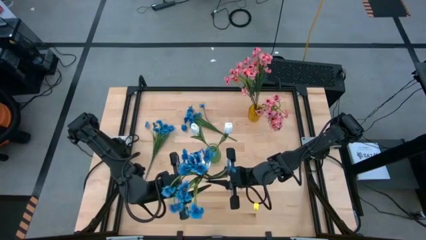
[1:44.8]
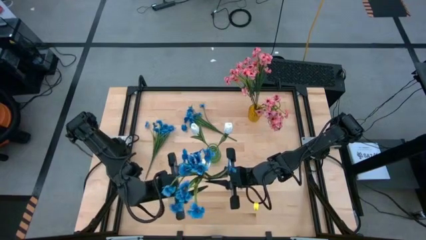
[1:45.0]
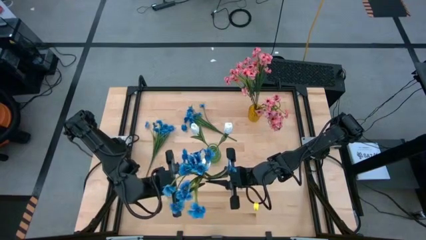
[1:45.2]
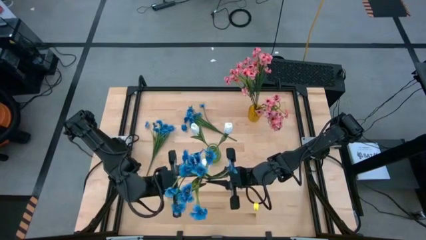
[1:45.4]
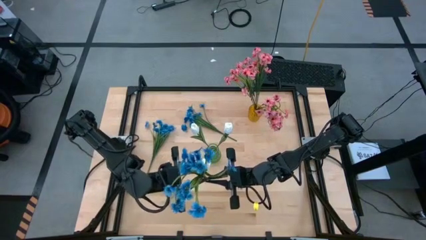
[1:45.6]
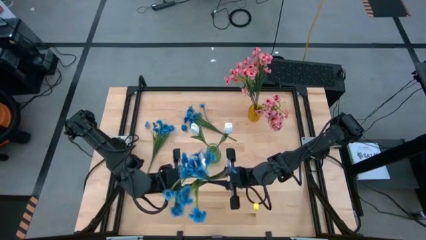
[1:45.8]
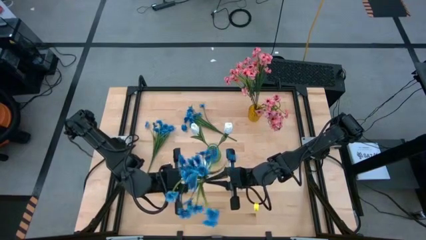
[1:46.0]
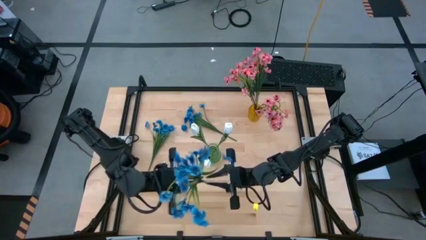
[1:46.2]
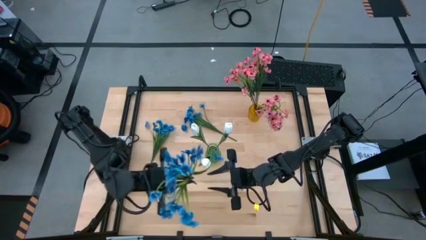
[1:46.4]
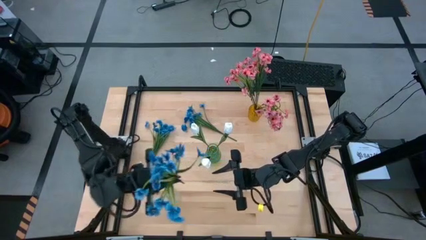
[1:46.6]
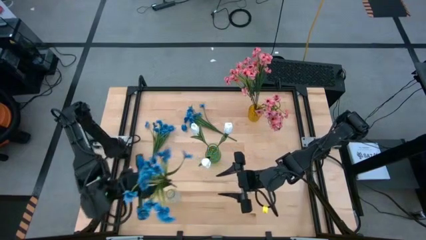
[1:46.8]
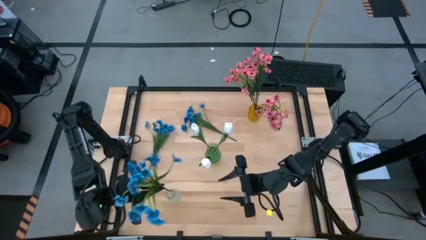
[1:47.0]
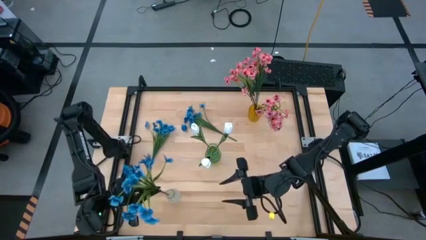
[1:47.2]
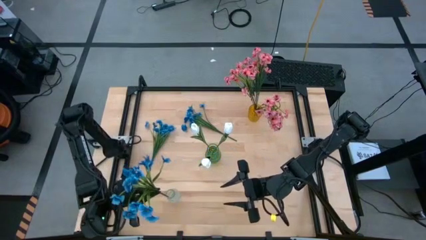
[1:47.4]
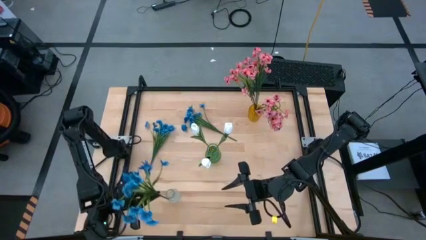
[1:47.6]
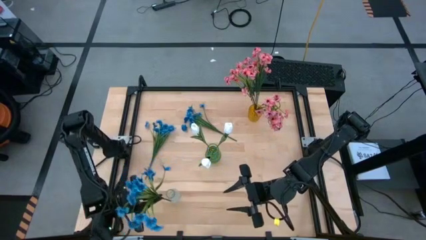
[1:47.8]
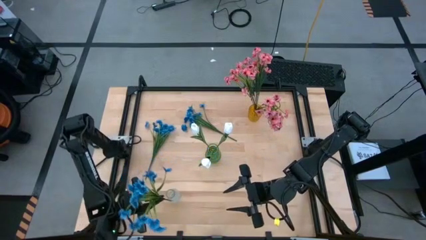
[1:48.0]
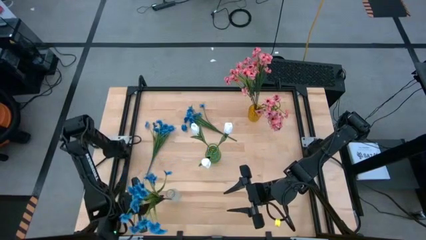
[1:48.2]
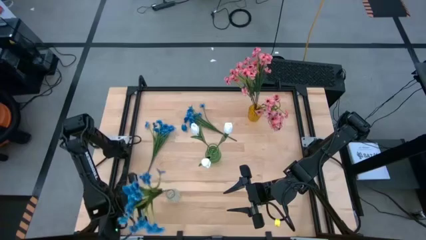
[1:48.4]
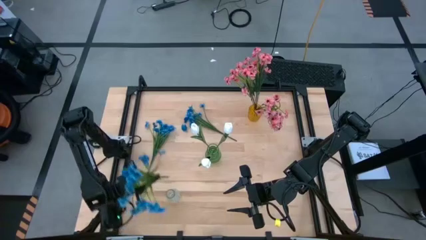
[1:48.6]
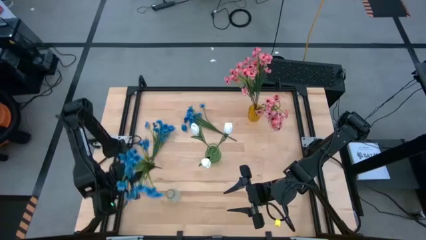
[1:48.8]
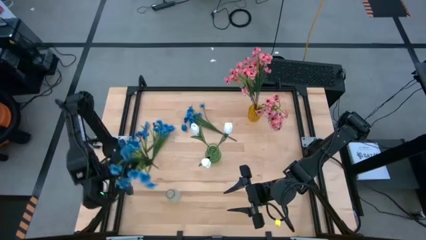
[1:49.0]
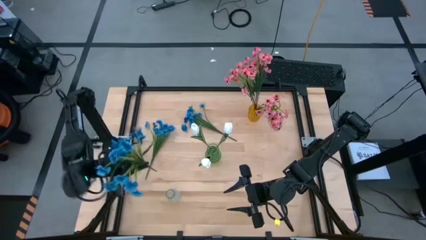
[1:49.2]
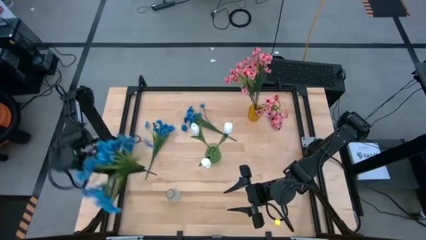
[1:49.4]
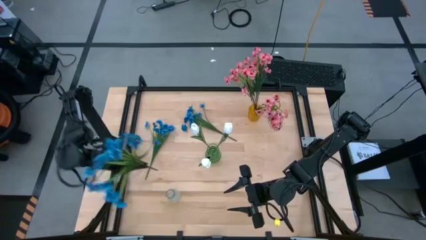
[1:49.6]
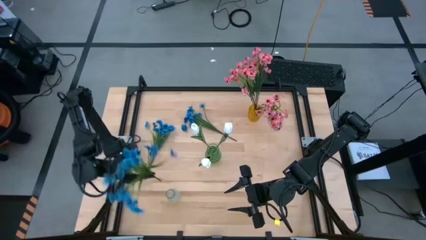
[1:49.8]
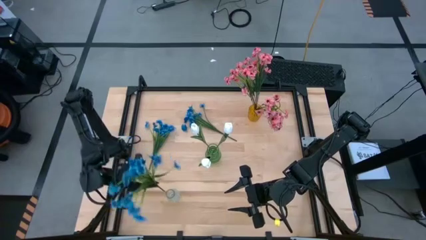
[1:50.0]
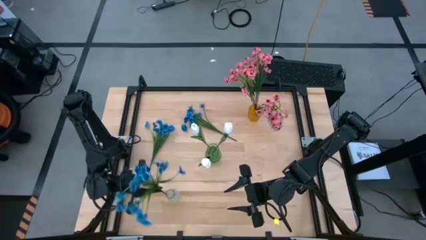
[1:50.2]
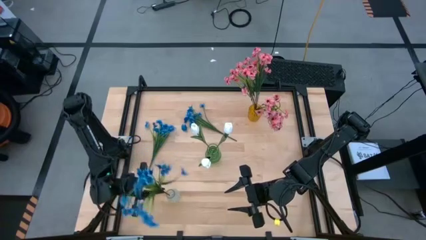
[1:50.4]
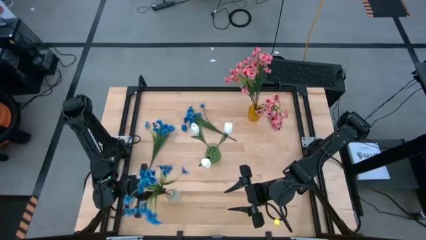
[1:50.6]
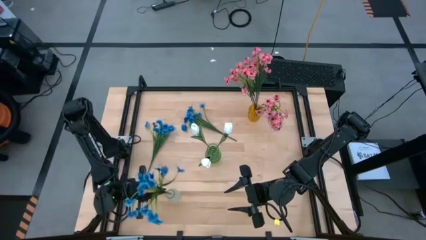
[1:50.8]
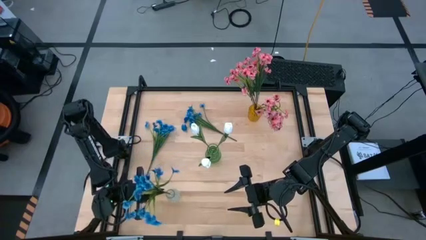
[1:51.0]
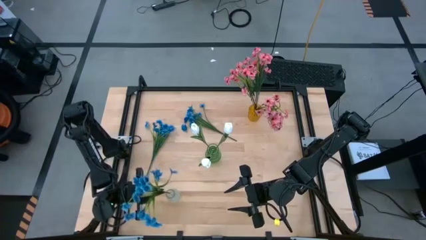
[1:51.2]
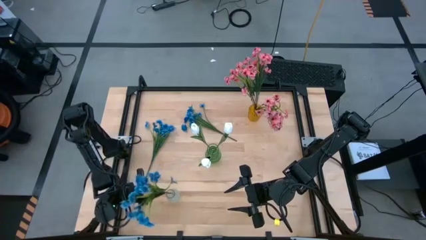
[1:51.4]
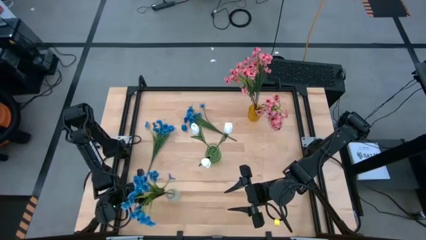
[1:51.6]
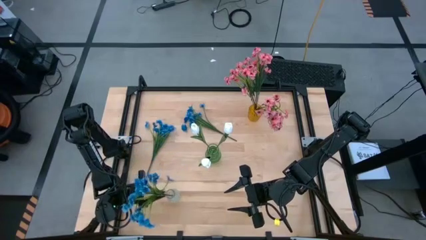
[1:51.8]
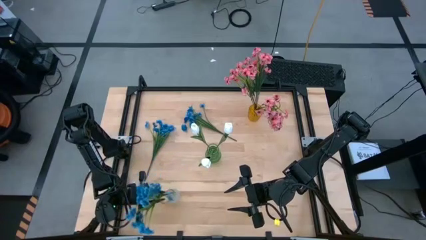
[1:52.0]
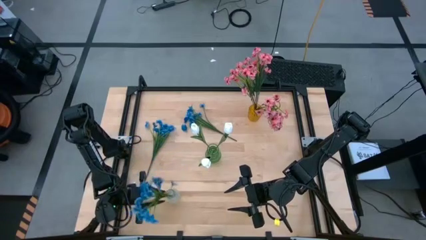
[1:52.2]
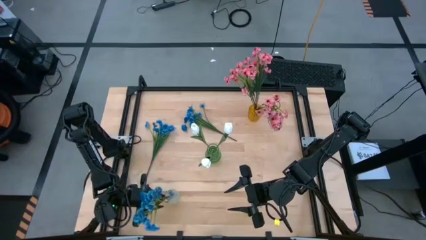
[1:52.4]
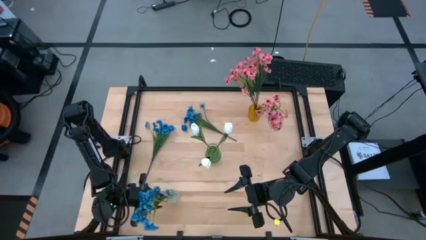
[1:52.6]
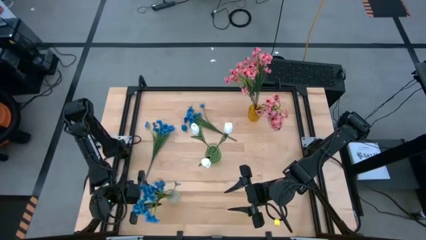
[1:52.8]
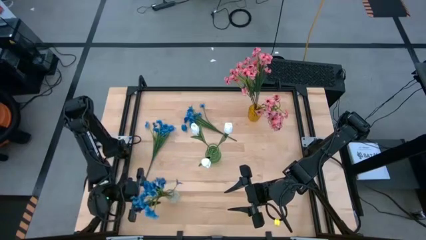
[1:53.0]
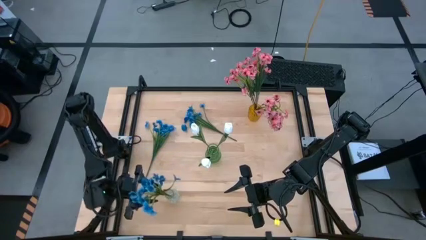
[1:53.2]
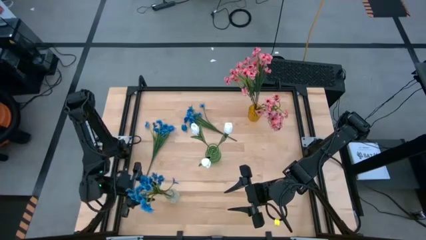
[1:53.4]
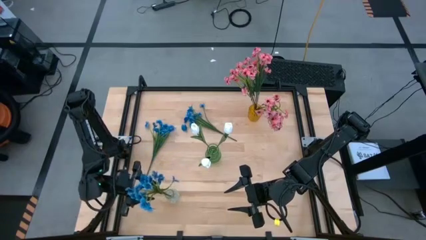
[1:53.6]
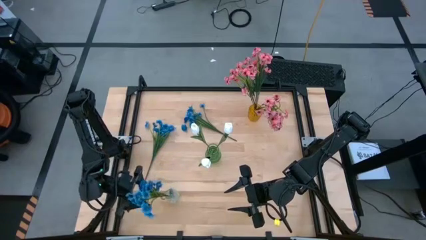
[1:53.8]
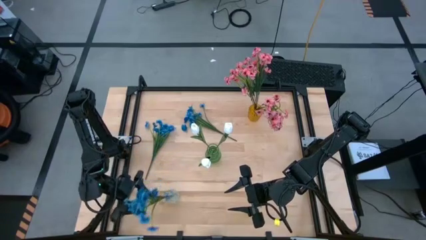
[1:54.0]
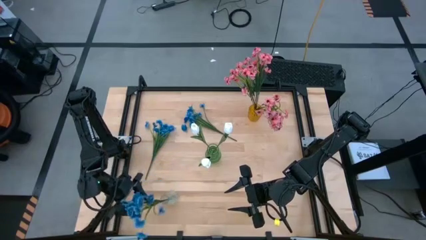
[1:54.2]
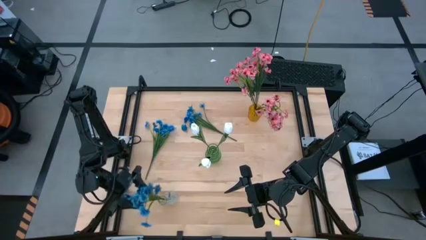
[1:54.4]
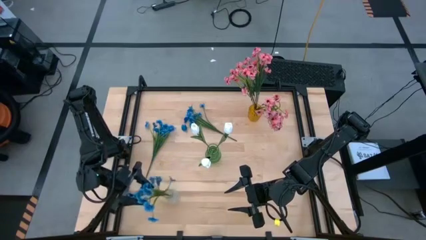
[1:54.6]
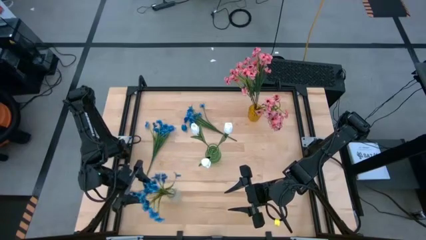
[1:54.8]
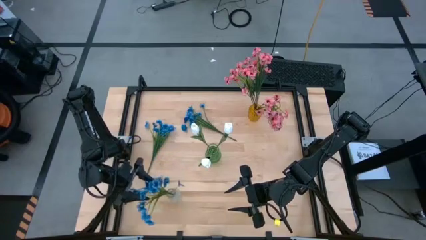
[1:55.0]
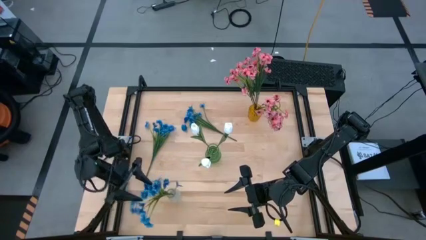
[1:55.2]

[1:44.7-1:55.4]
Task: Sort flowers into vase by color
Put the bottom blue flowers into the transparent vase
